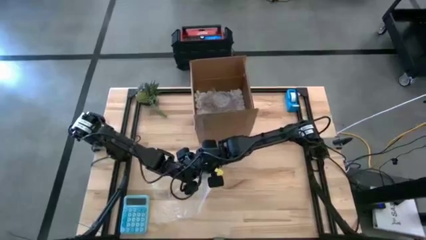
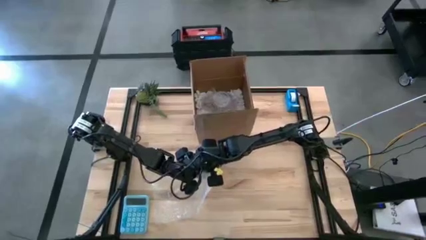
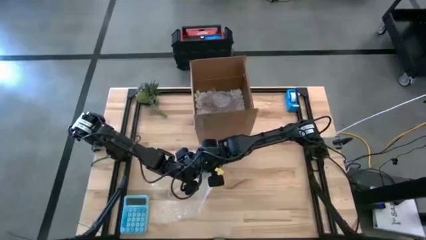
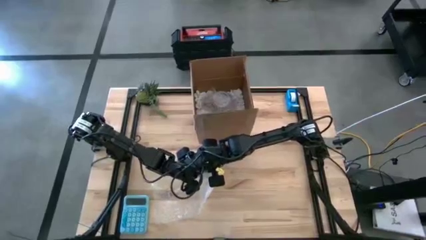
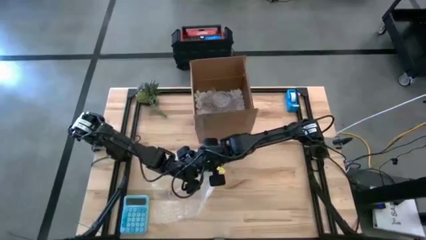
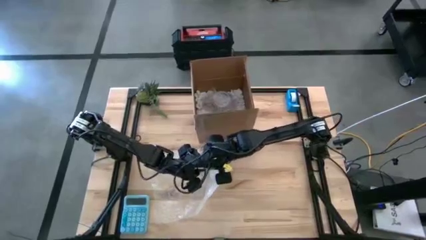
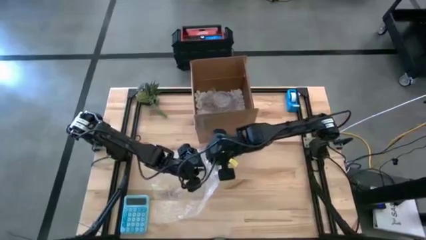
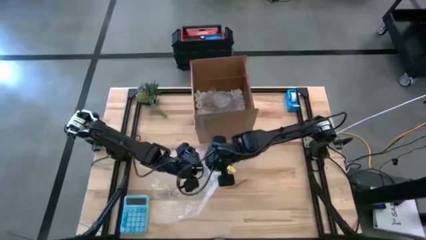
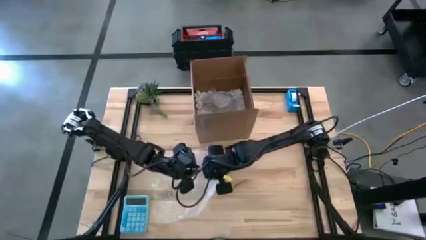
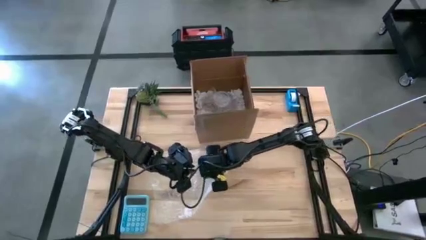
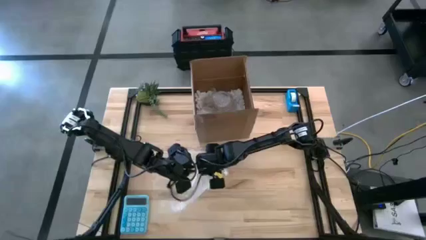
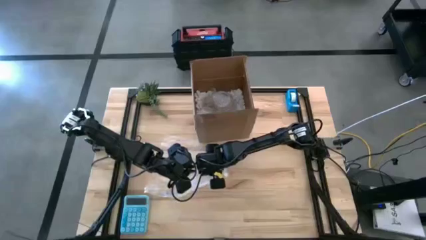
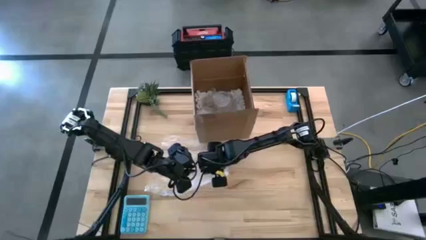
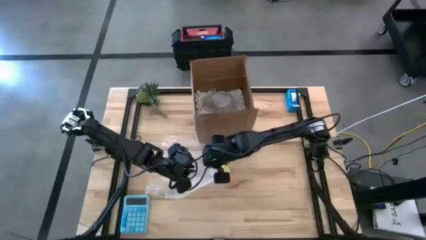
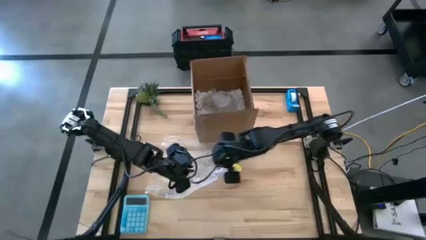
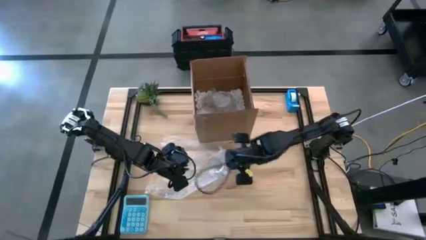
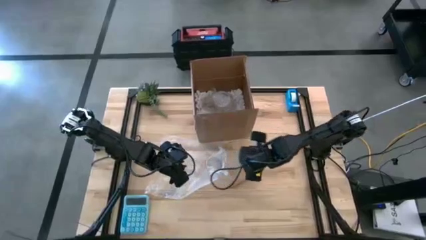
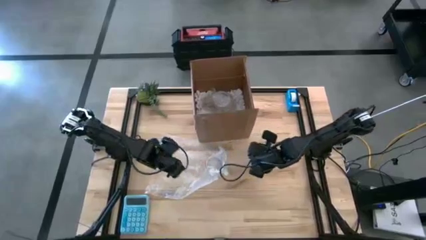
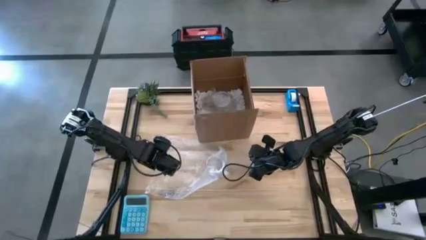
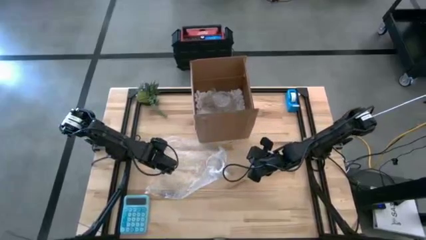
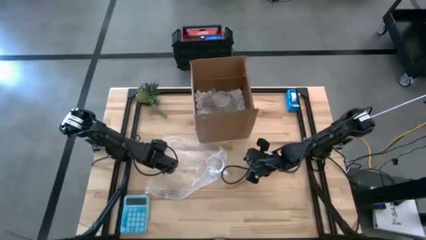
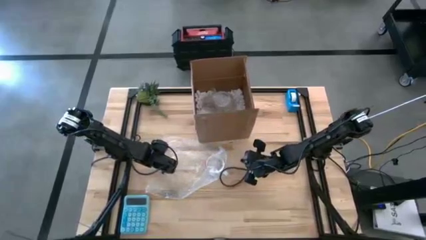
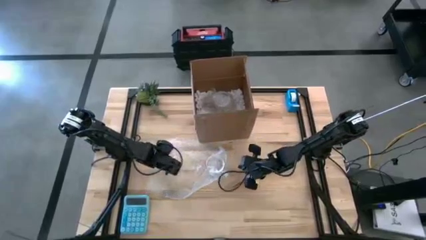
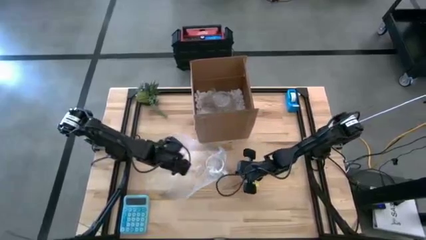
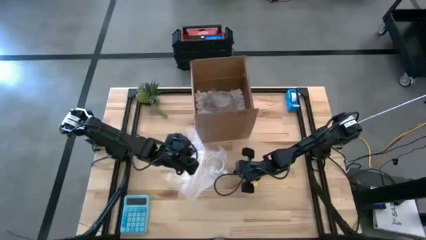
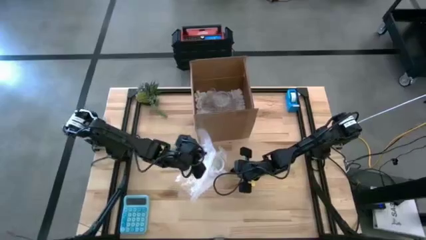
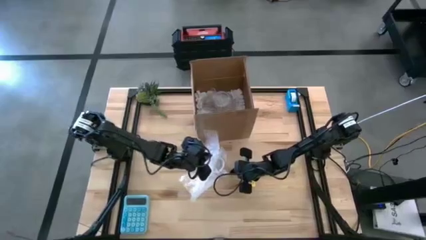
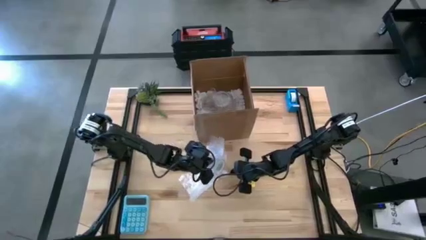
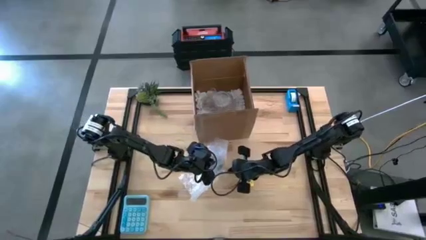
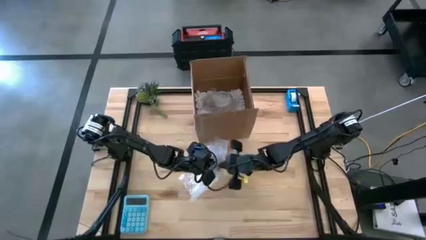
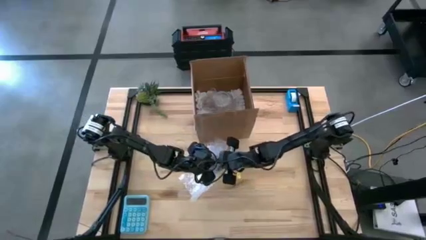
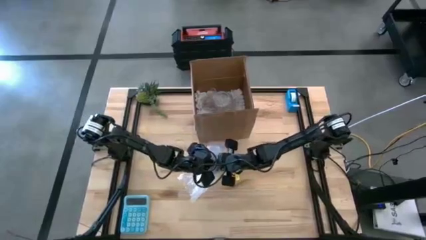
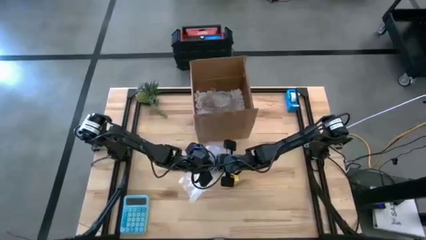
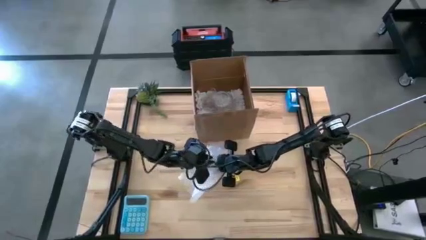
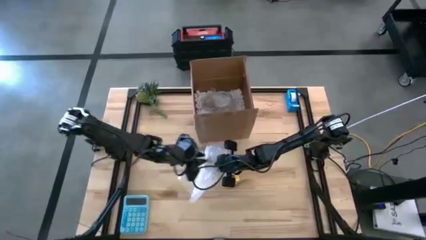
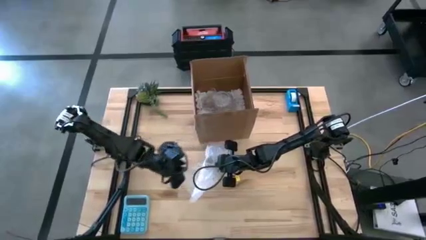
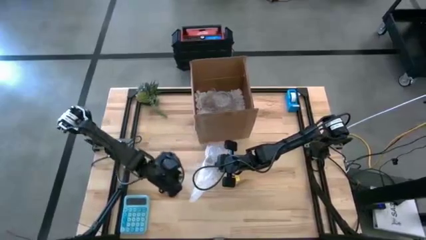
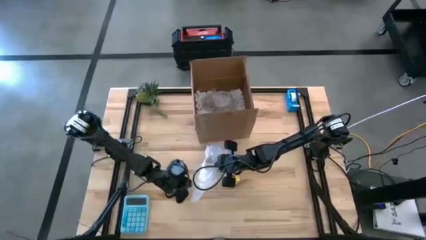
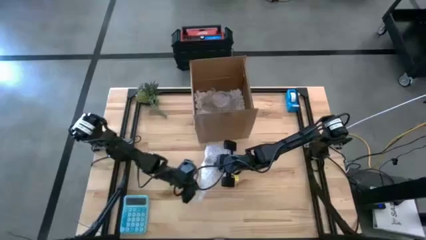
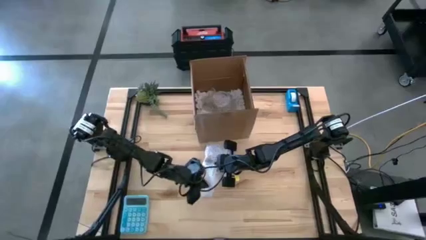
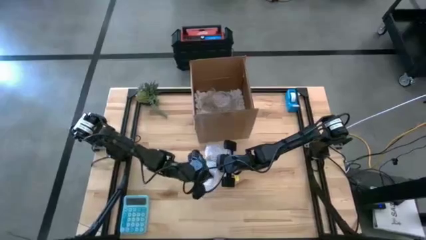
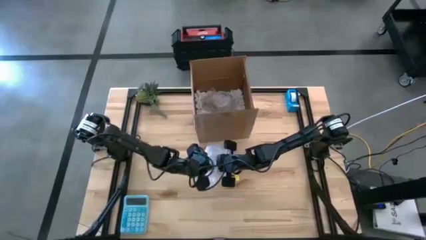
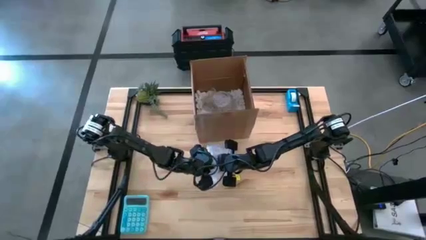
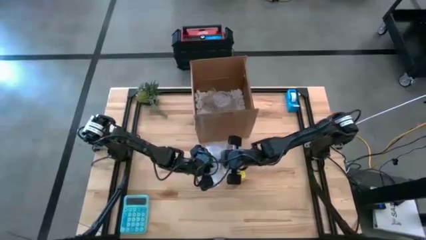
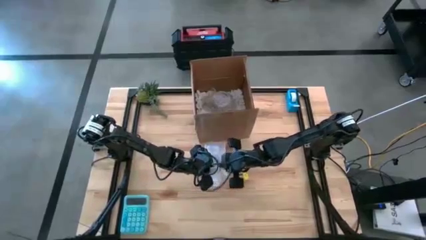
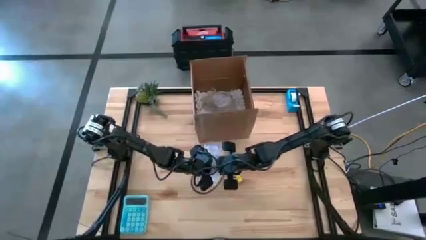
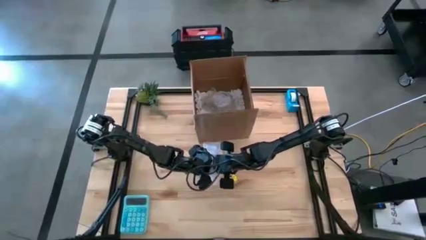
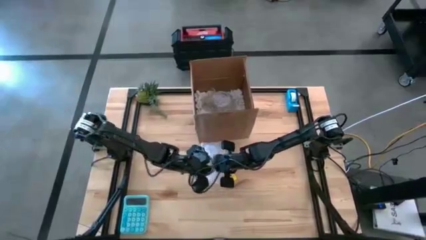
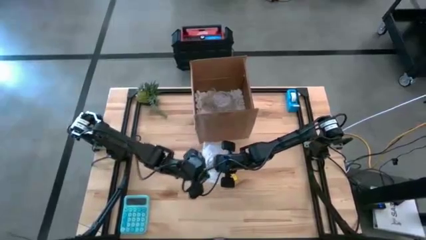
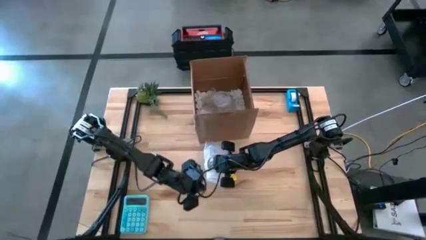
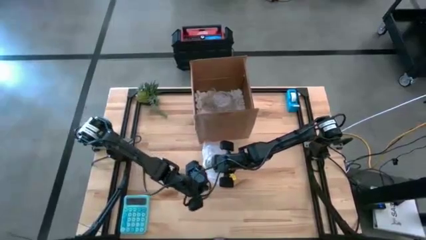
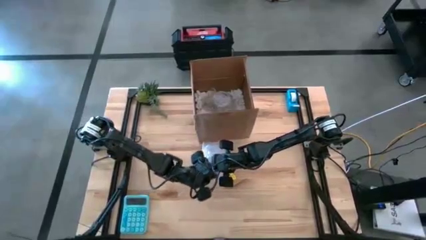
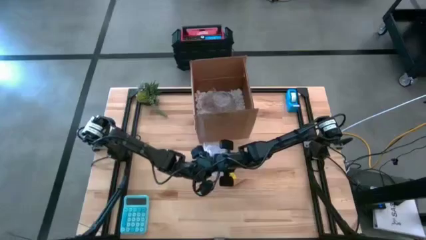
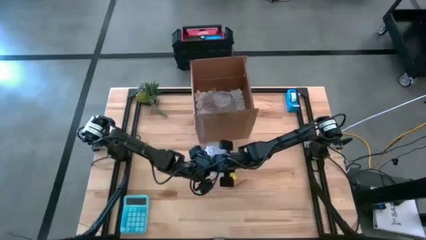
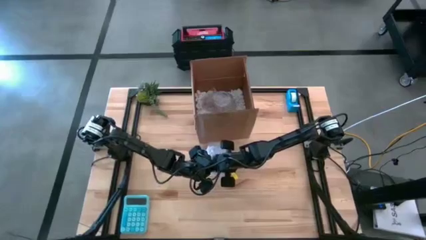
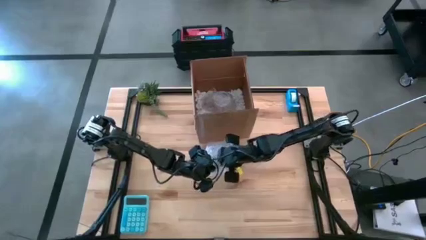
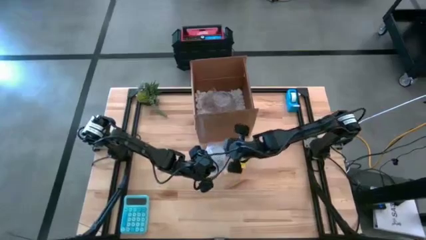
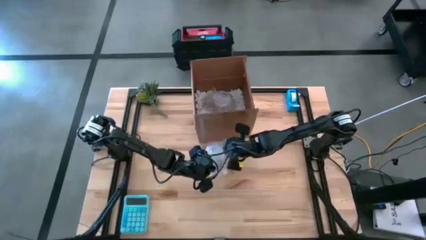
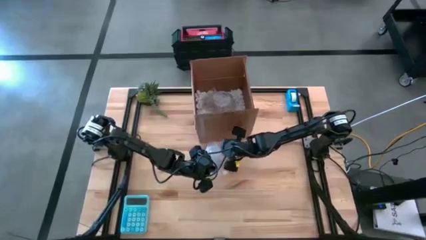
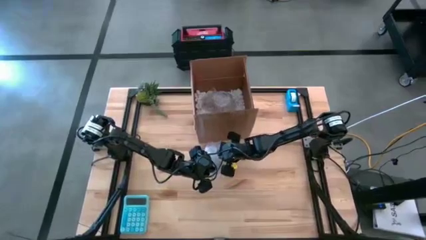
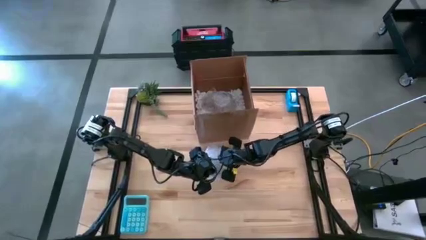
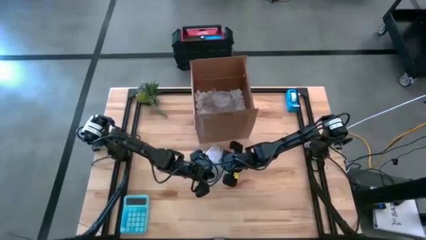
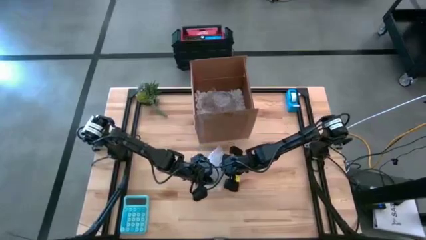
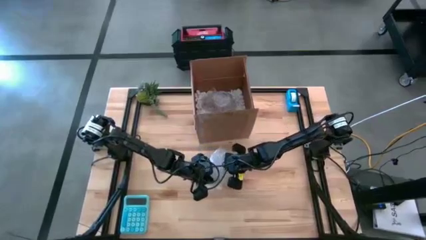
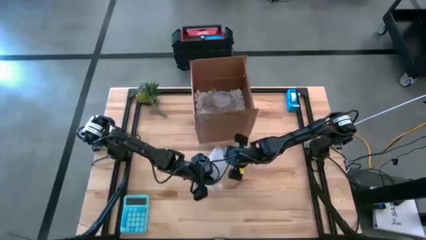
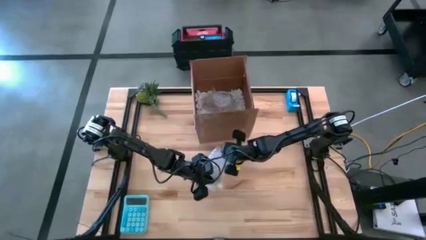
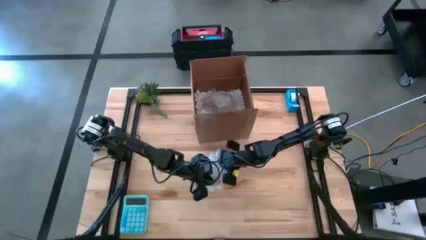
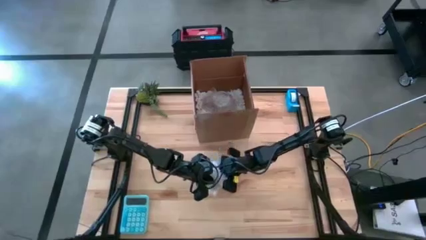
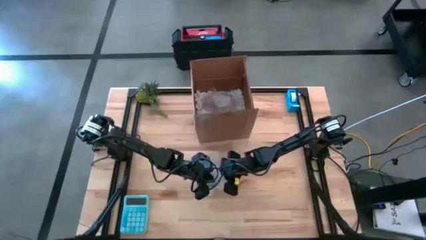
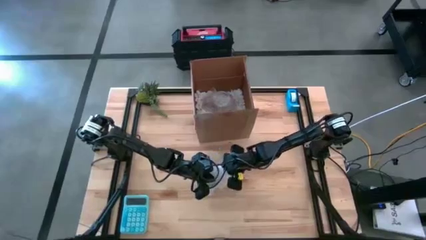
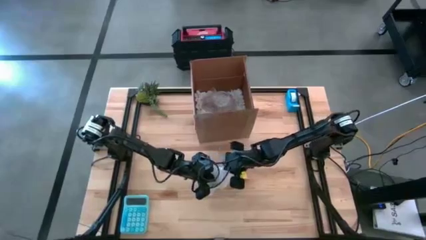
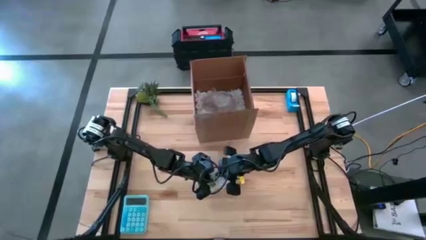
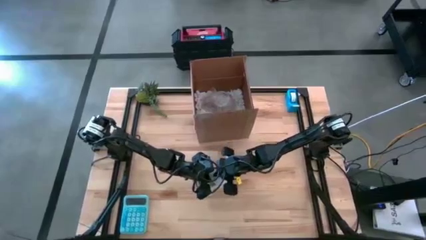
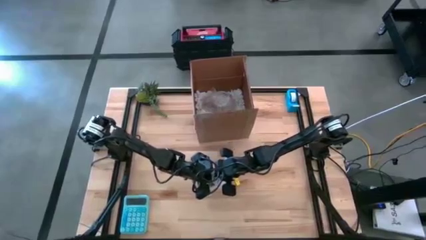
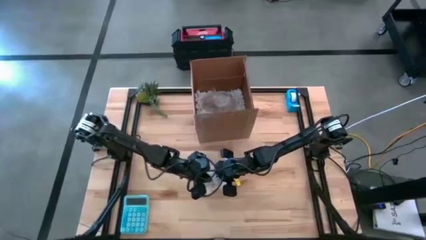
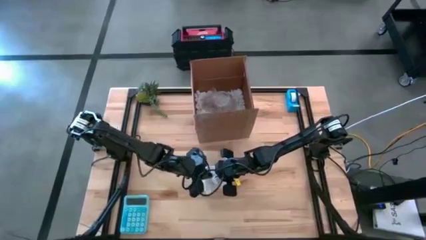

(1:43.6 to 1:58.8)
Task: wrap mug
Wrap the gray mug with the bubble wrap
